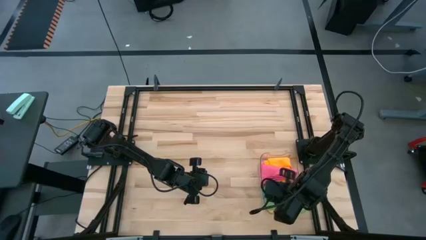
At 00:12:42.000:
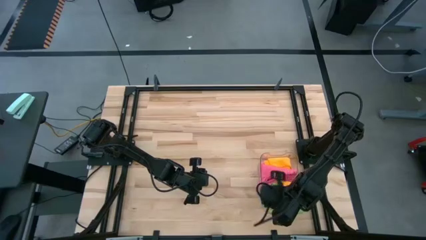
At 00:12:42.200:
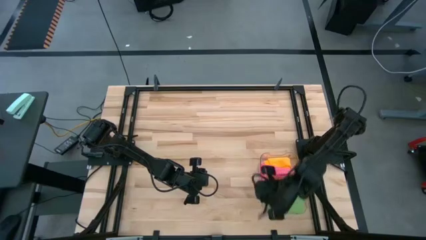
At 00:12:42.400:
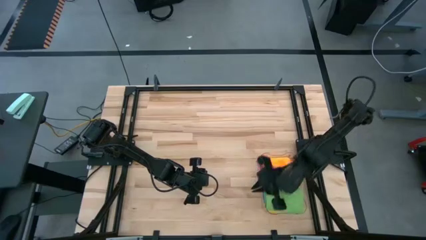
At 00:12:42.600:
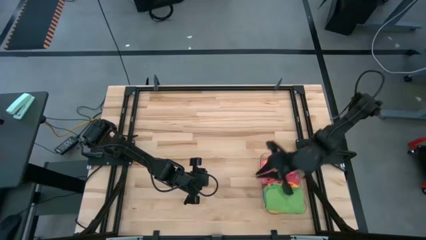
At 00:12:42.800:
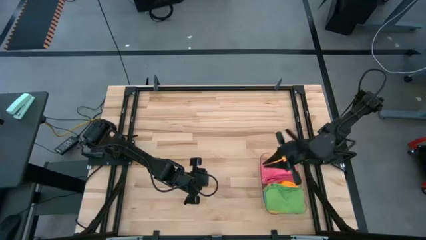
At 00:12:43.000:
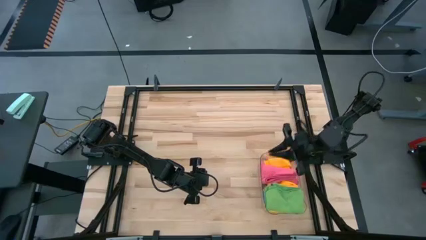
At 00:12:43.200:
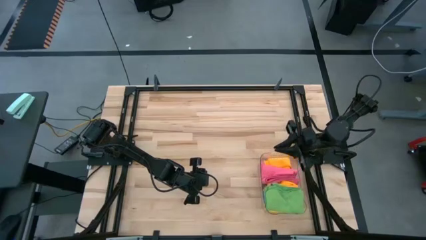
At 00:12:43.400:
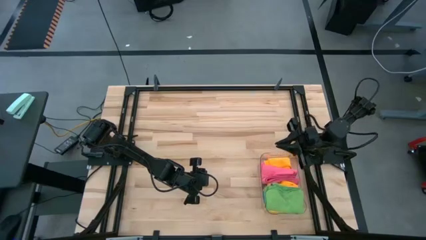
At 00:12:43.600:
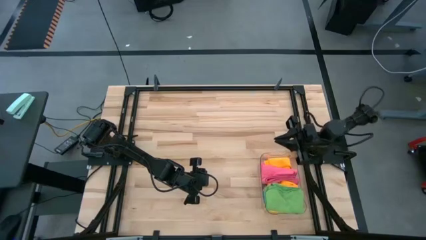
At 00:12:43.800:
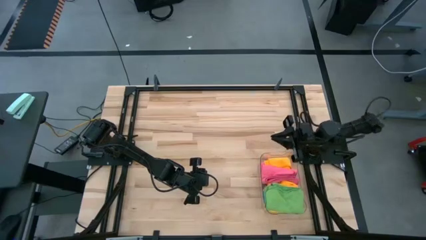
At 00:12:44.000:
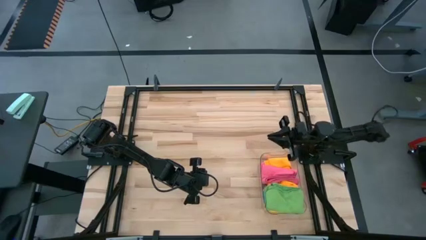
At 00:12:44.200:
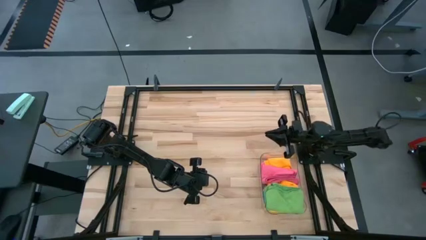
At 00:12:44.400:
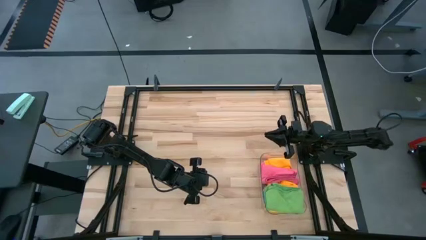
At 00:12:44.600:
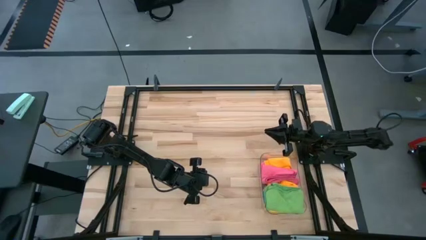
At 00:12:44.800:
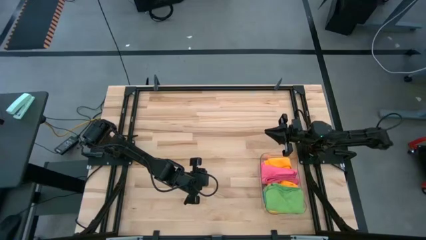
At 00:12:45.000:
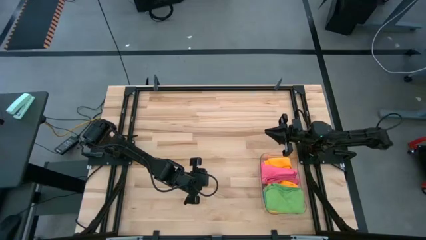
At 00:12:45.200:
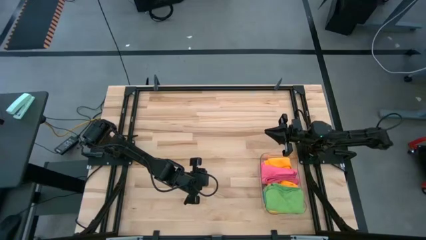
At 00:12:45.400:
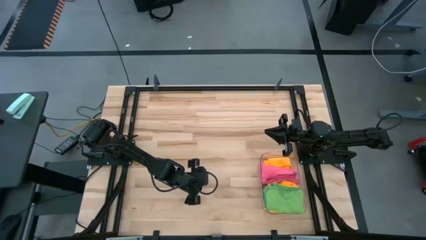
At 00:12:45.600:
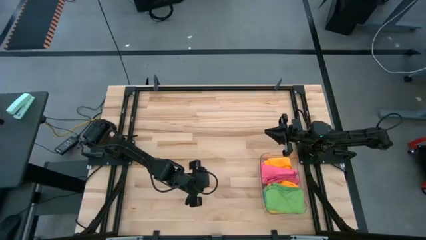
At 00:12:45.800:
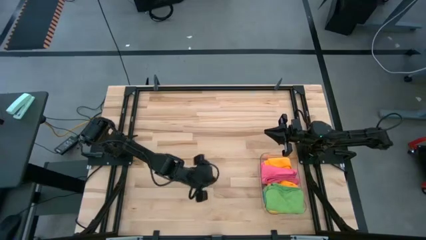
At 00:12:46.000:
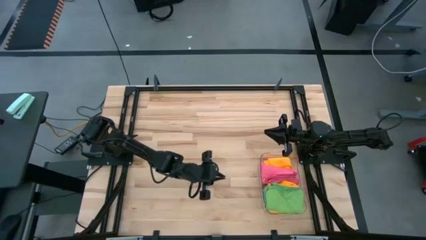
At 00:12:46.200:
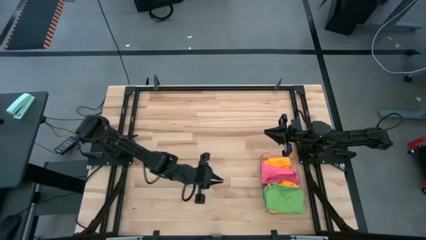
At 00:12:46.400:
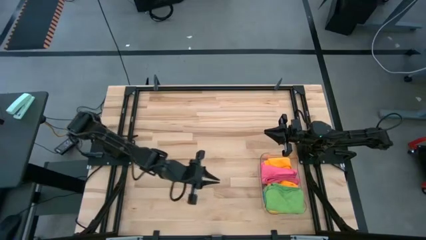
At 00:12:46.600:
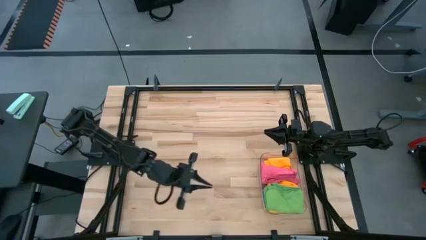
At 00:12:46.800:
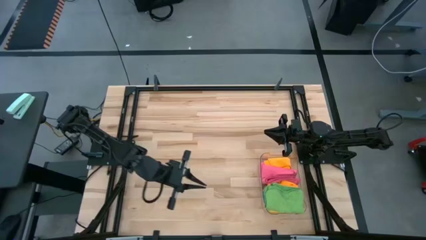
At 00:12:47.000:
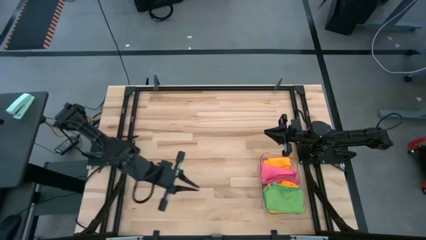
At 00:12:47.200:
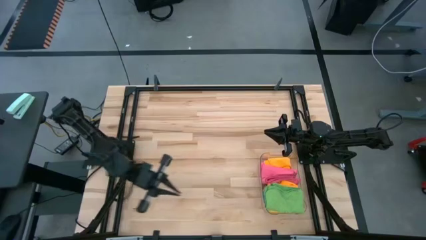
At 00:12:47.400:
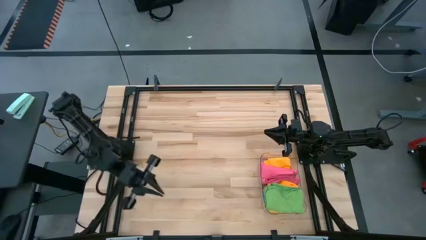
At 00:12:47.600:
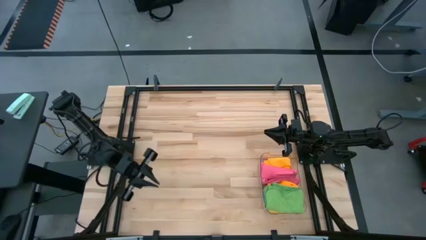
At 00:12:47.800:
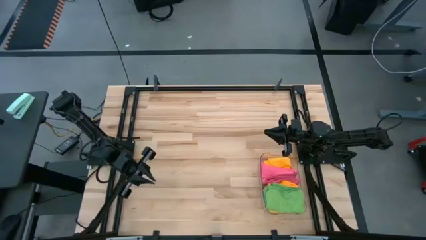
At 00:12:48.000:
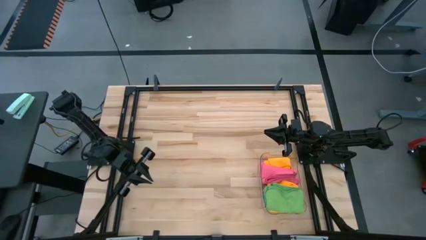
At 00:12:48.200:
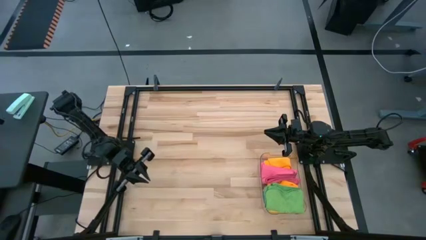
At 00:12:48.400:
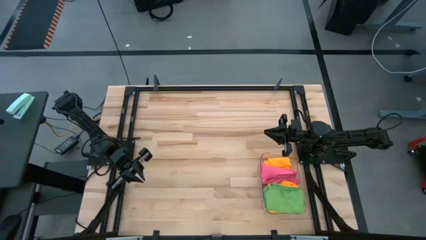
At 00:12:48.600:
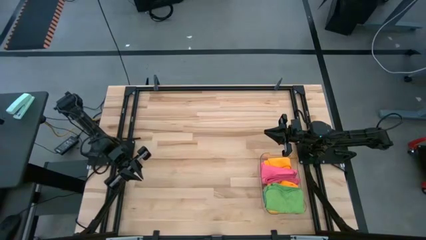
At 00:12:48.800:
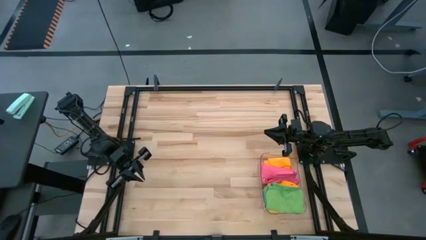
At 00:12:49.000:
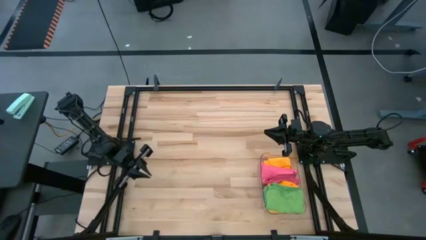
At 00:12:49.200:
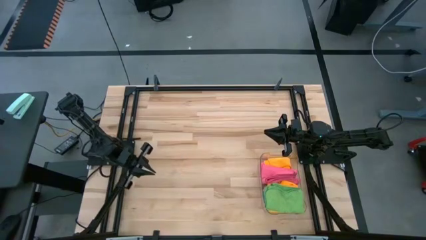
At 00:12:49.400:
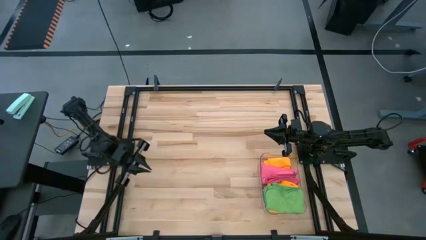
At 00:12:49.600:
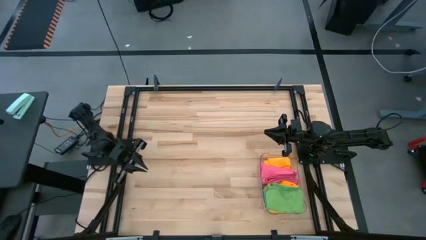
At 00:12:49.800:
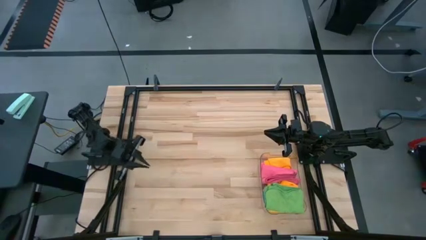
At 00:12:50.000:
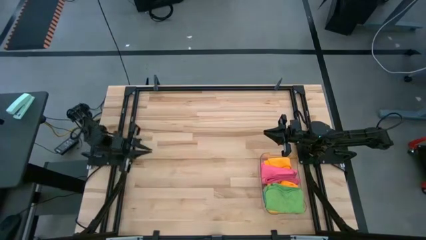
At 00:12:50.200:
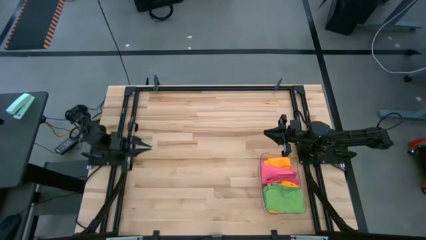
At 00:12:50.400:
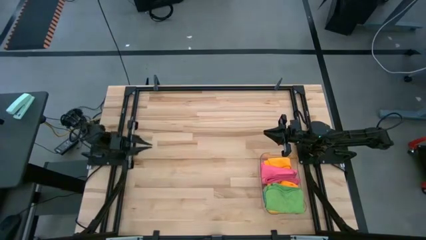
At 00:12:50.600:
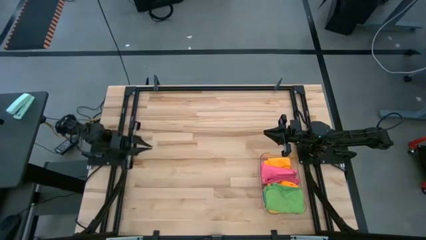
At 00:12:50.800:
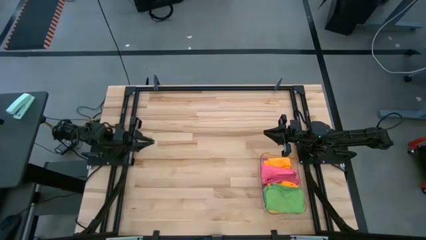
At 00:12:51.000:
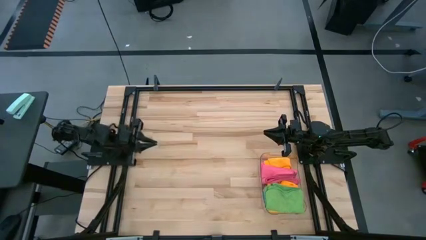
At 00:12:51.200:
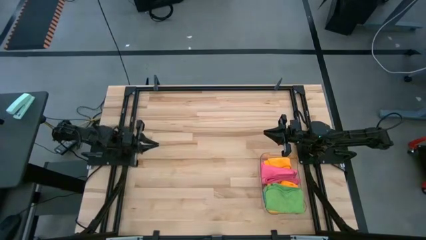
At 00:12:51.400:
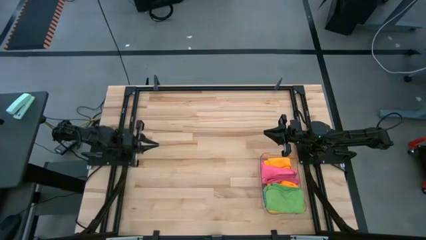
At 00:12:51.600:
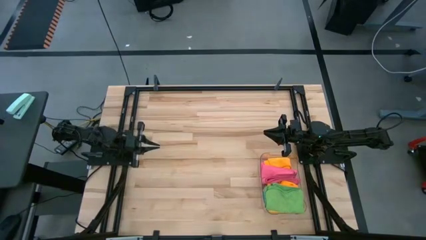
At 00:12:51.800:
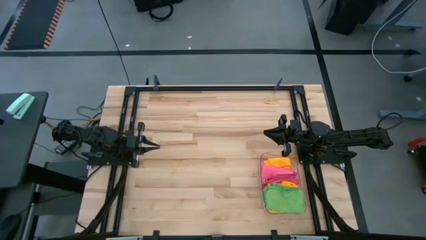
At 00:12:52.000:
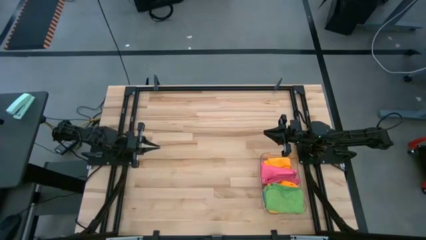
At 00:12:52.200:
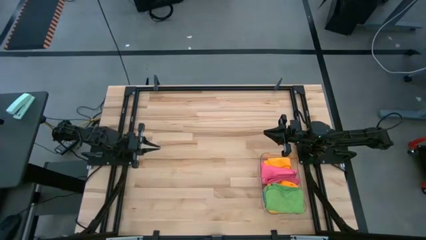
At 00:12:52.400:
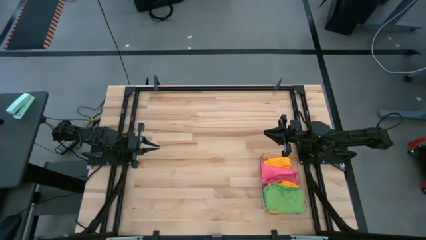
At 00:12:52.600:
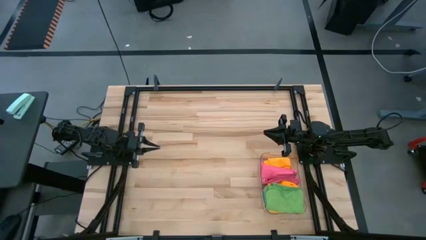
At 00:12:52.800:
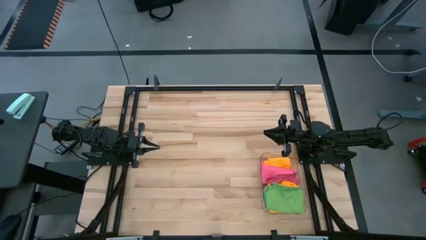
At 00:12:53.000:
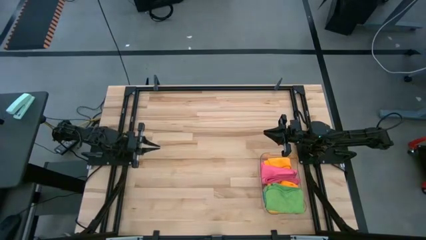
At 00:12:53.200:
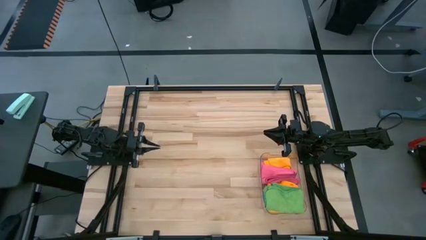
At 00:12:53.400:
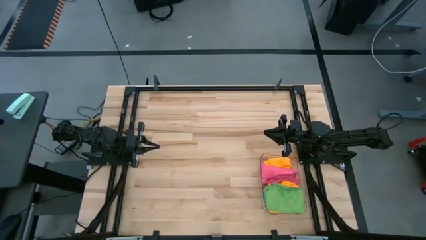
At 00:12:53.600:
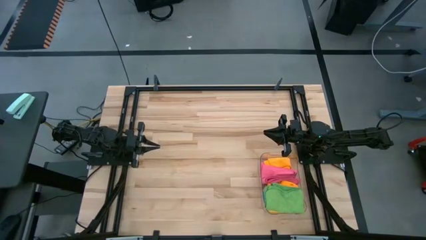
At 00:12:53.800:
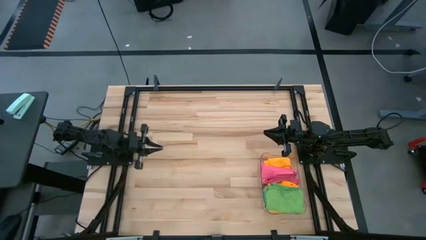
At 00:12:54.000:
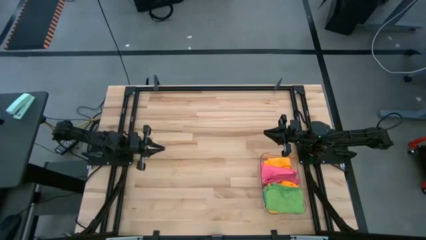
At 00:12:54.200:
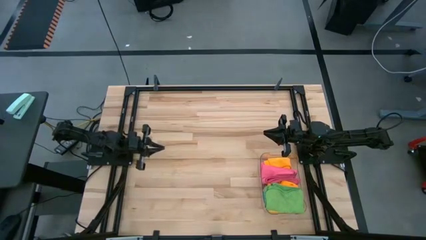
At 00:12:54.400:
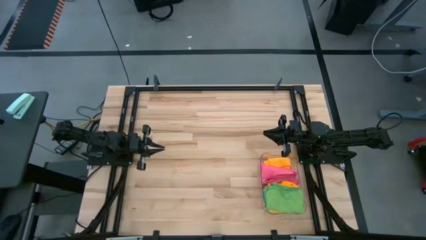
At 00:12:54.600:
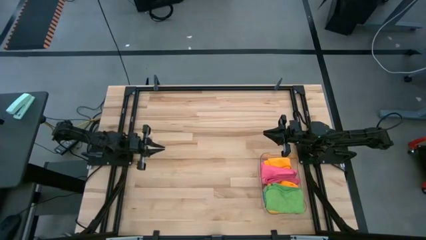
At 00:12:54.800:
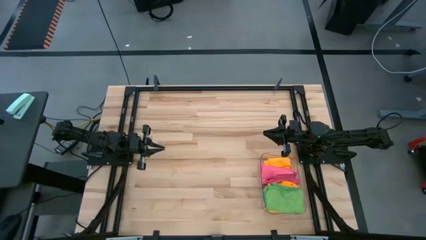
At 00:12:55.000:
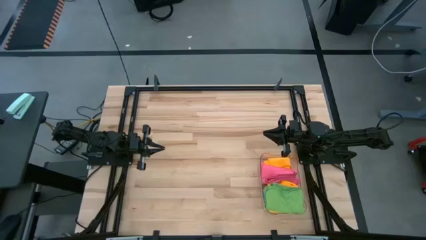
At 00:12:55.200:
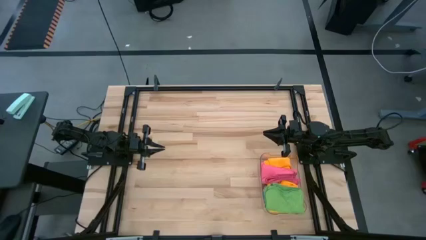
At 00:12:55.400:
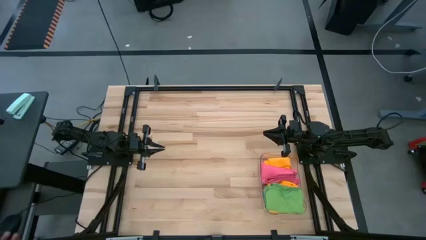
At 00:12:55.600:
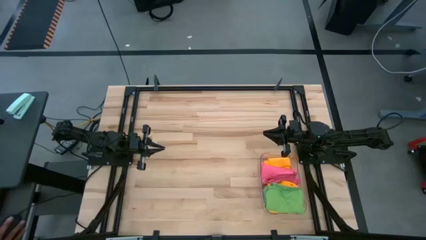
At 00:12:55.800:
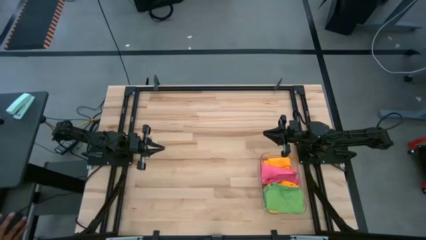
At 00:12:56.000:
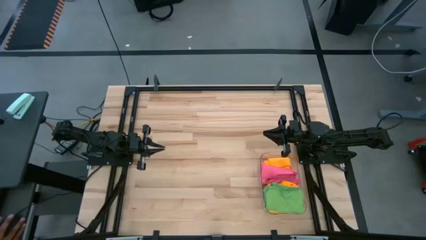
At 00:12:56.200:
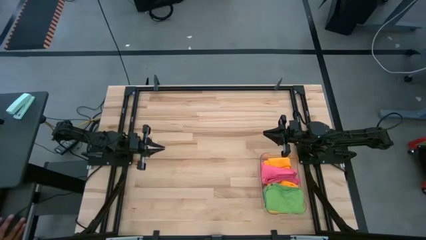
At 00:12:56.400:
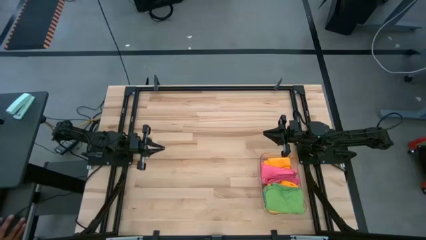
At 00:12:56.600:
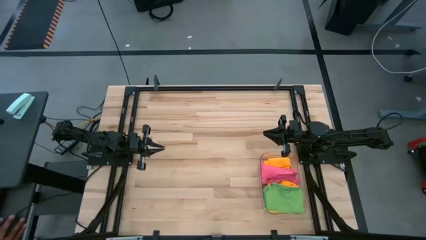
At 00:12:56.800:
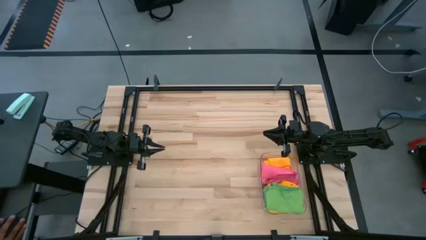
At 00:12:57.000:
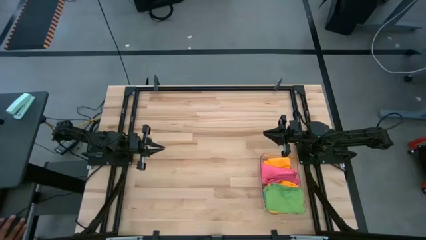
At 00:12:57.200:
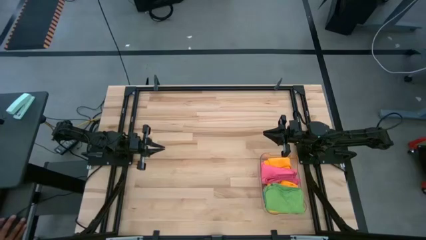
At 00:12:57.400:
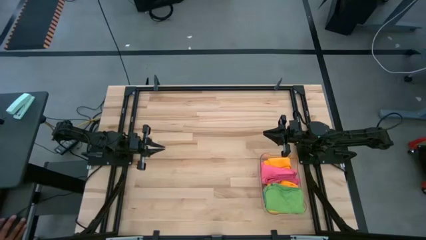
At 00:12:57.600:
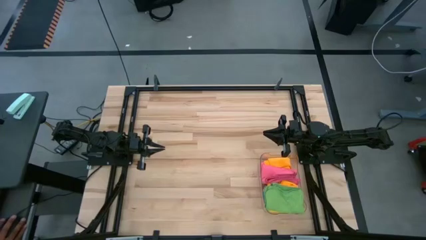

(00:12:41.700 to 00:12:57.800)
Task: Fold microfiber towels
Return to Home Position
